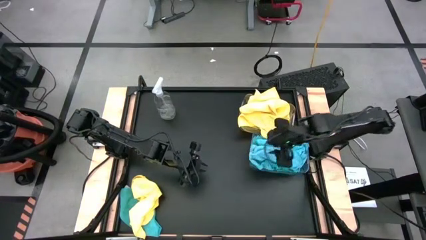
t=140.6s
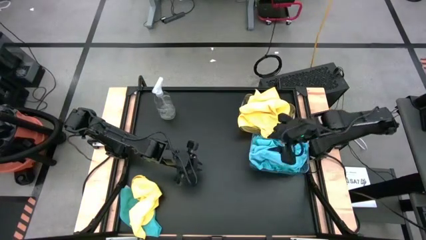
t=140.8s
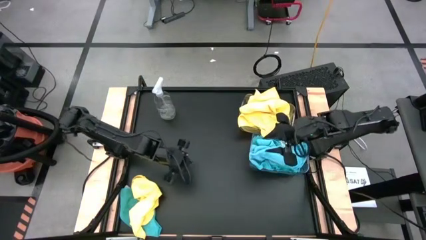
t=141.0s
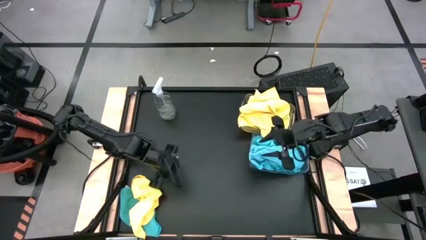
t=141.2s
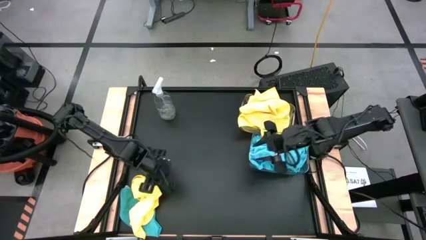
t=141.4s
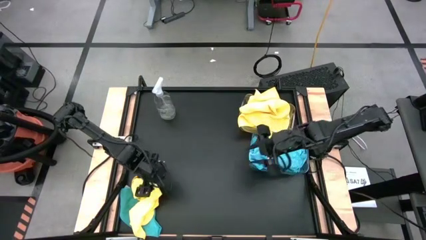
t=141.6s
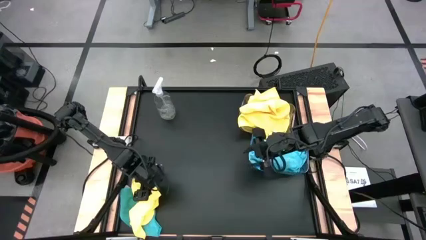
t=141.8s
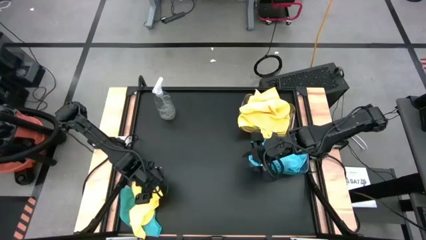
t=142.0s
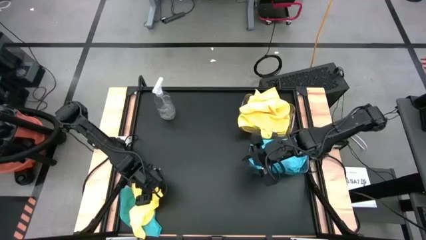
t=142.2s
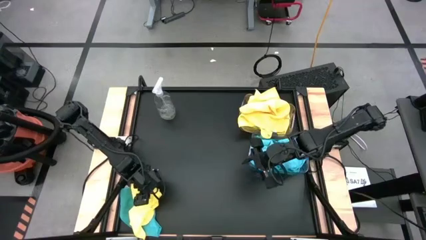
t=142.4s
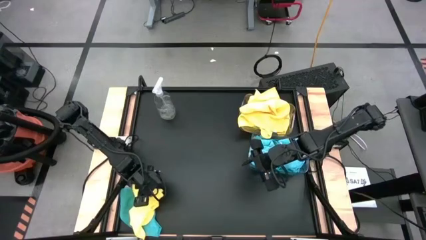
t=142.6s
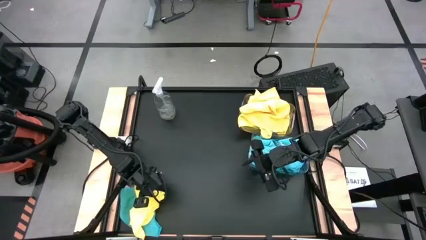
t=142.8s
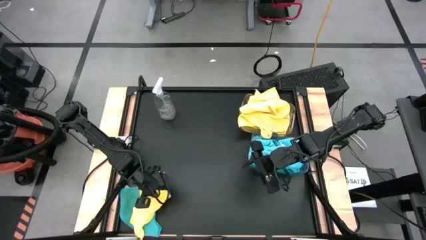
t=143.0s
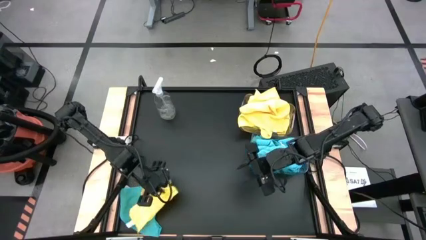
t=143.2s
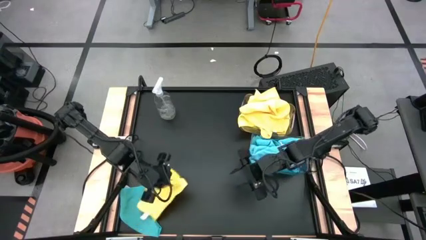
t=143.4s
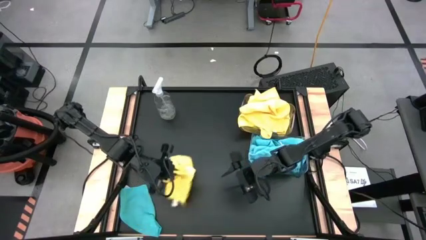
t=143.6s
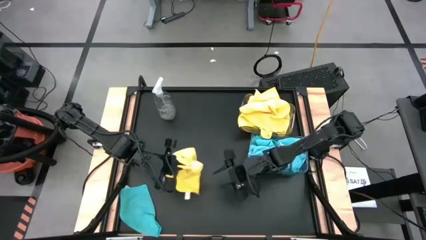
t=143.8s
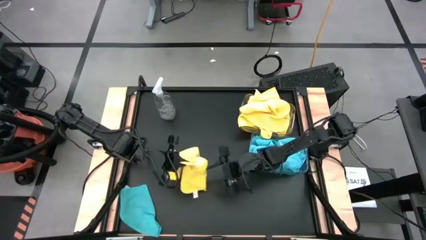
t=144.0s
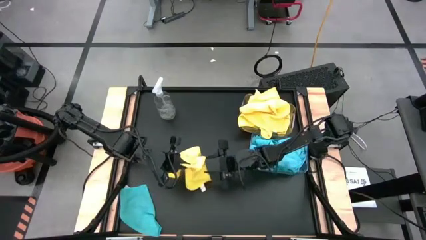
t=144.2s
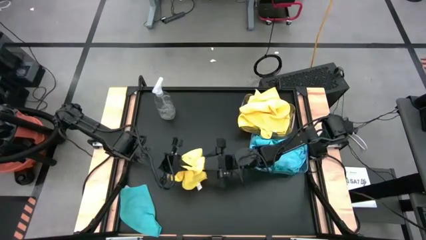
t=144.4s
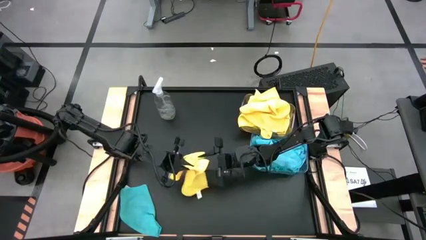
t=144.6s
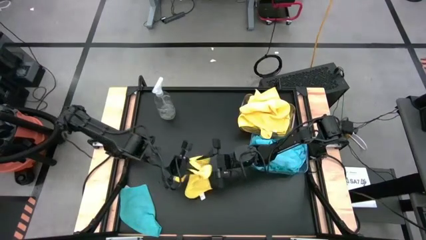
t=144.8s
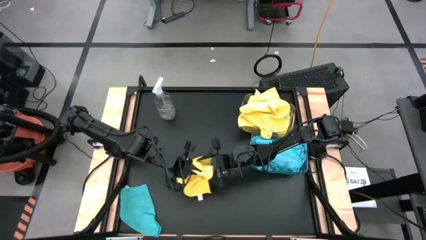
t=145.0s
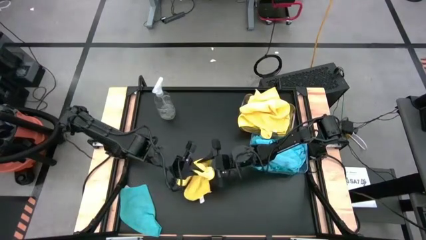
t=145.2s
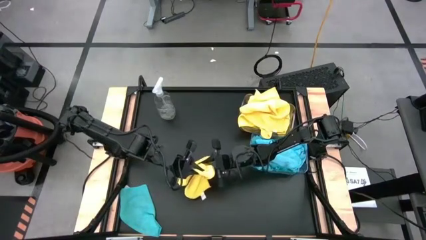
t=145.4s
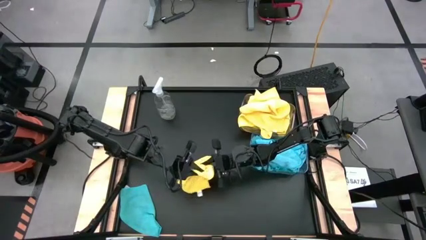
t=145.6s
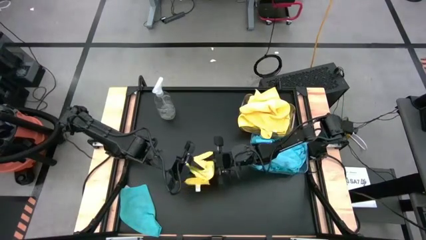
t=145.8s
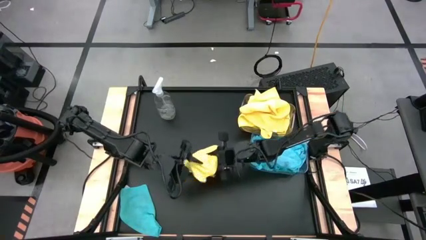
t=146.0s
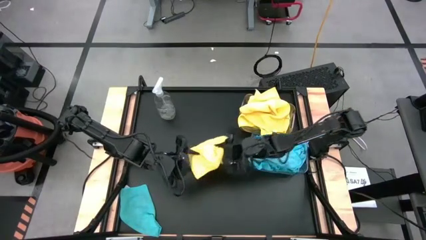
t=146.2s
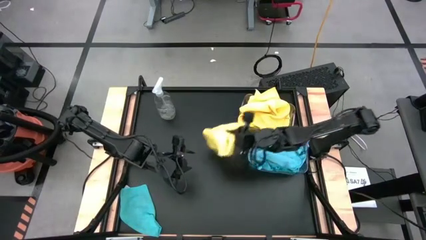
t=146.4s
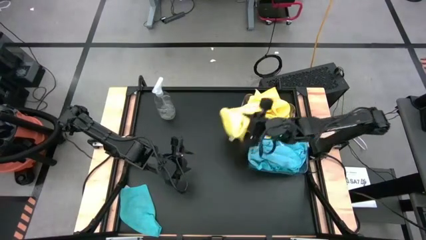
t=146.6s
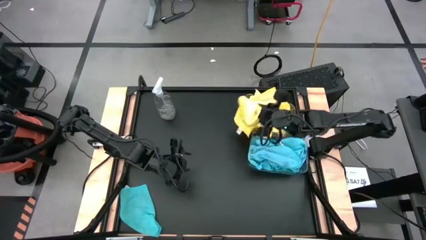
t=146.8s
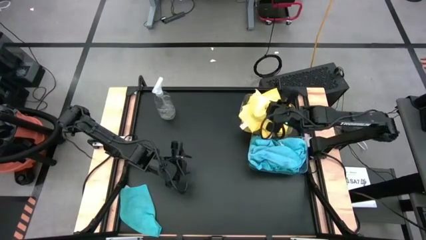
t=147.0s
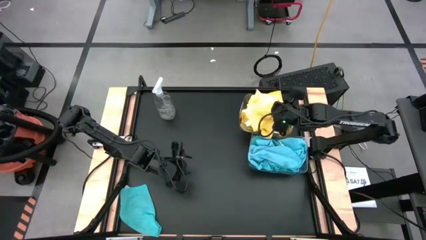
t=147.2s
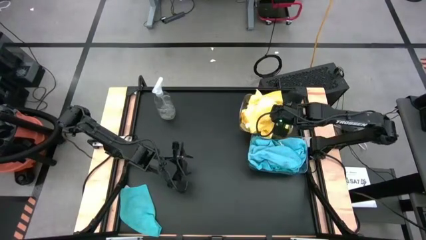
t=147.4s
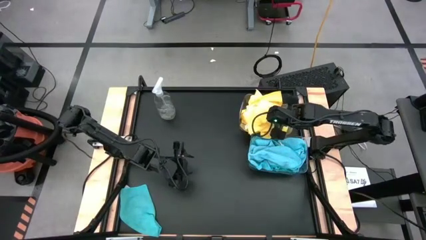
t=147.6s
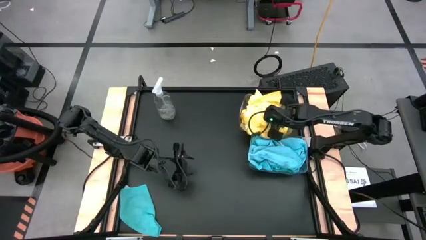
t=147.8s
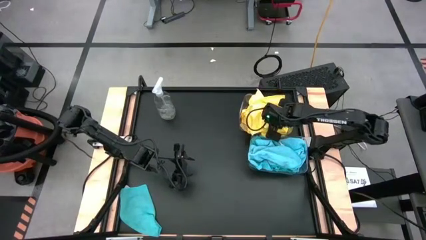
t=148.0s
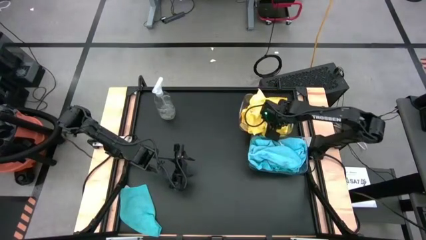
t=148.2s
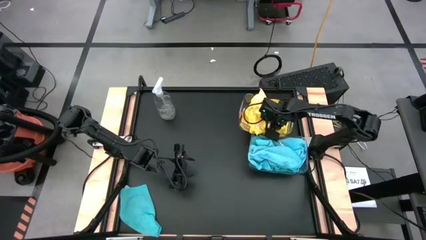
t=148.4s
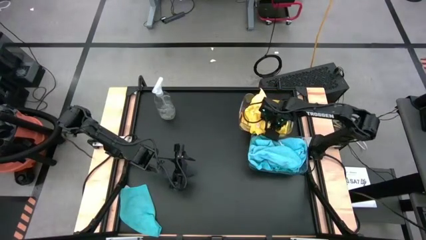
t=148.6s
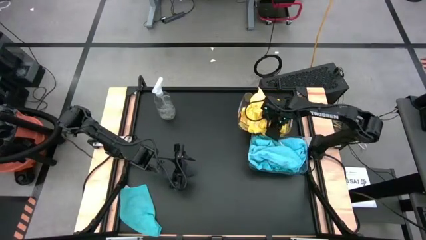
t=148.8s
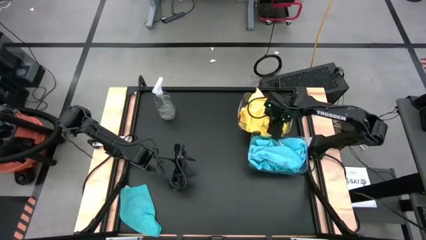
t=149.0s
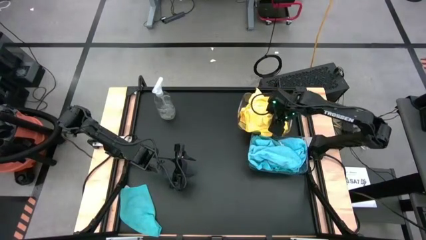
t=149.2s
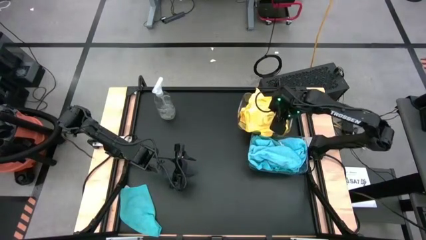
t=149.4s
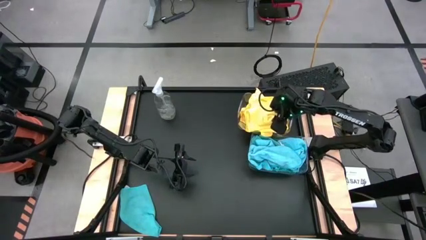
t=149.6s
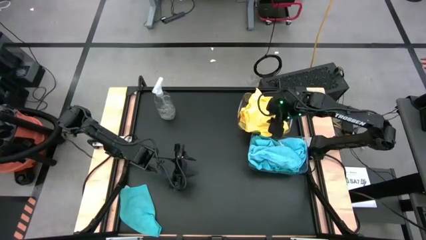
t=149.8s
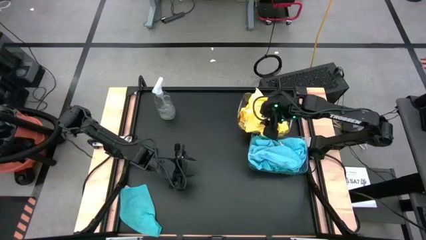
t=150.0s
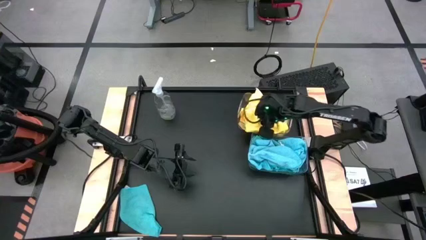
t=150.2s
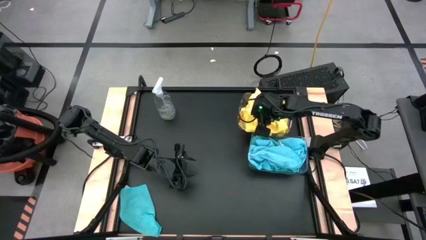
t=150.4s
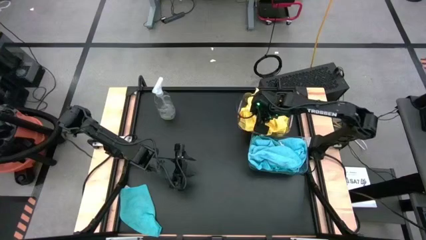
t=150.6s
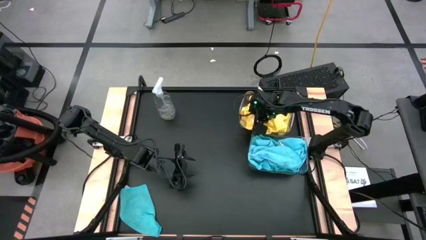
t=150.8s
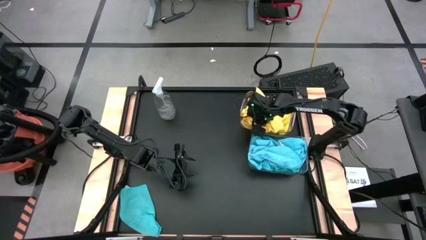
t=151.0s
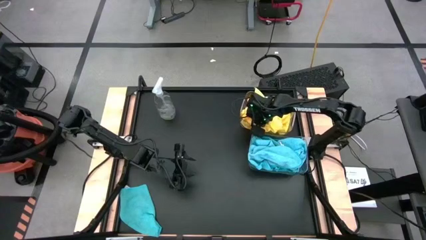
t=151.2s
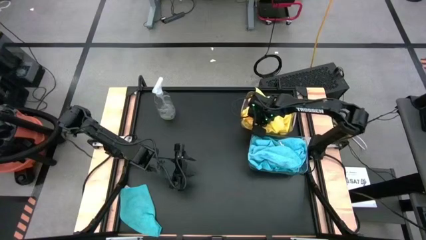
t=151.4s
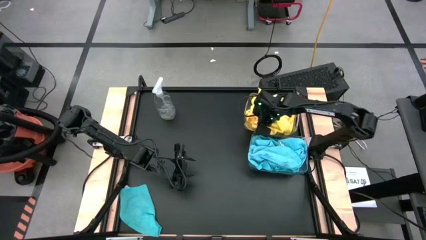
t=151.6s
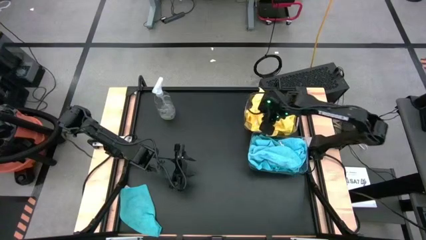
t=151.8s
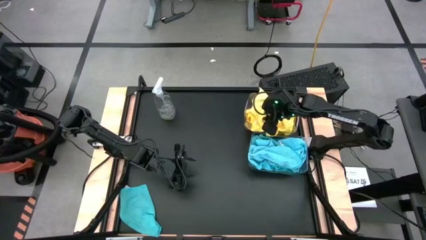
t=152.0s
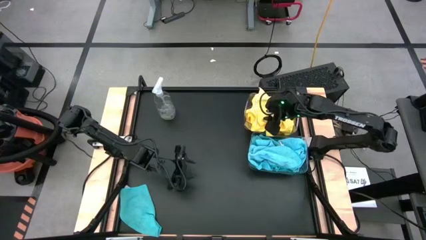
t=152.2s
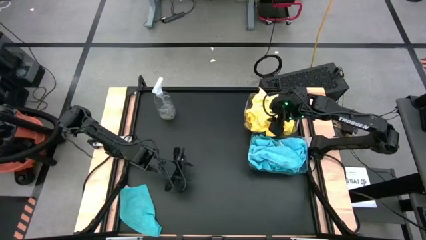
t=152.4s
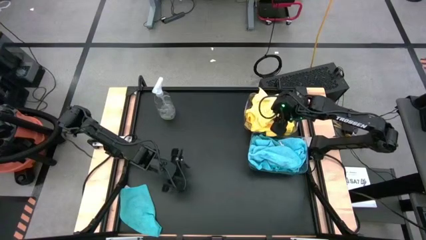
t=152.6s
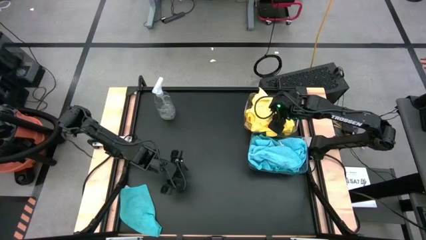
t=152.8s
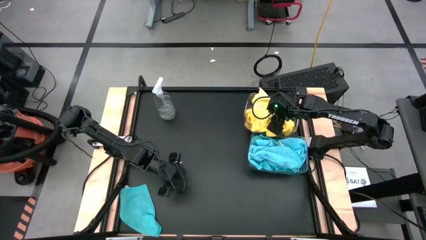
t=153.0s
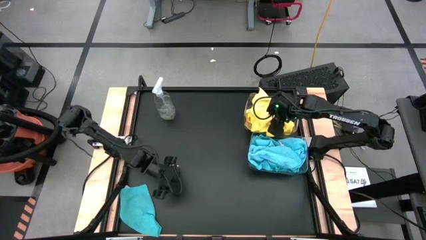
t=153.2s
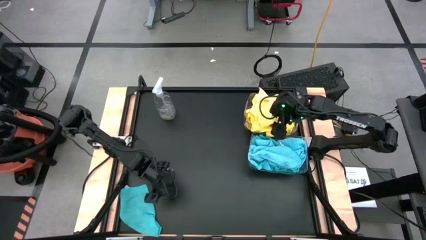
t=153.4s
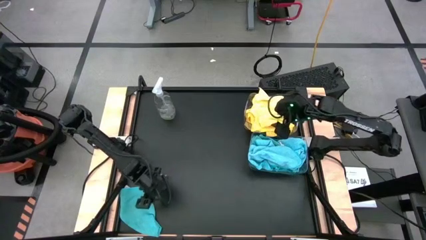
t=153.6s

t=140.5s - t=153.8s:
Task: Sort microfiber towel by color & place in baskets
Put the yellow microfiber towel into the top transparent bin
